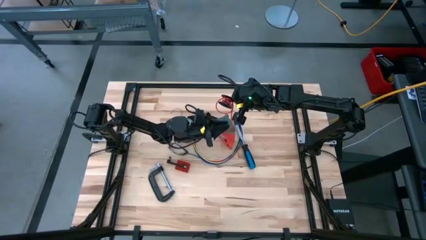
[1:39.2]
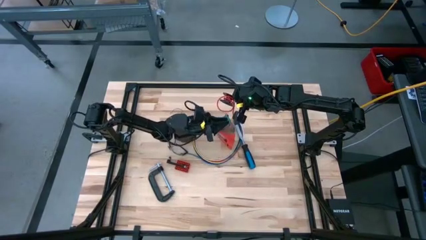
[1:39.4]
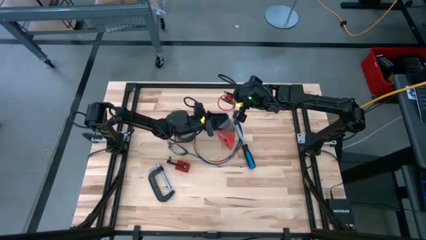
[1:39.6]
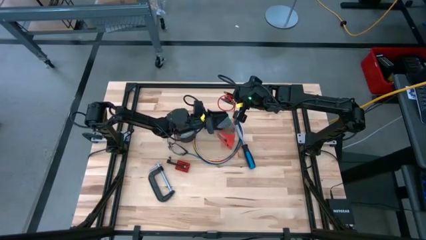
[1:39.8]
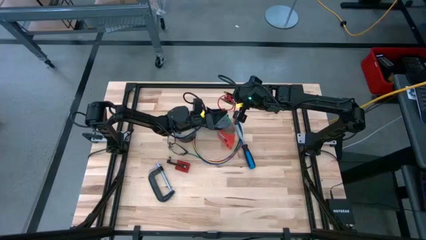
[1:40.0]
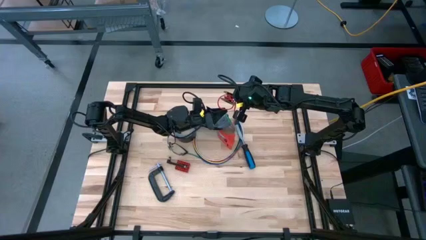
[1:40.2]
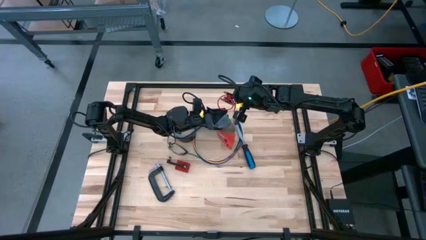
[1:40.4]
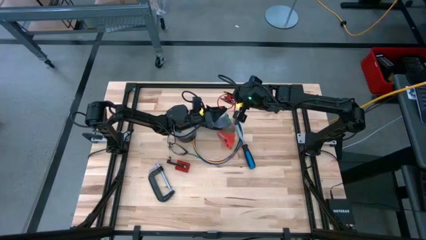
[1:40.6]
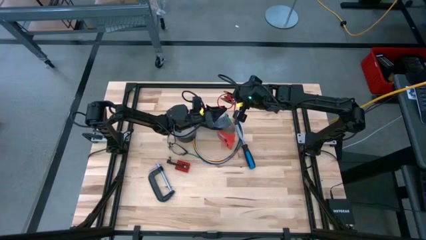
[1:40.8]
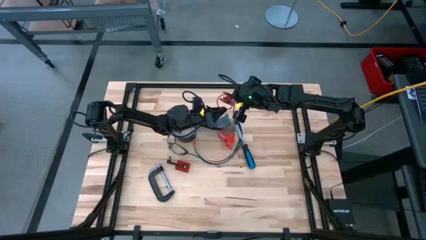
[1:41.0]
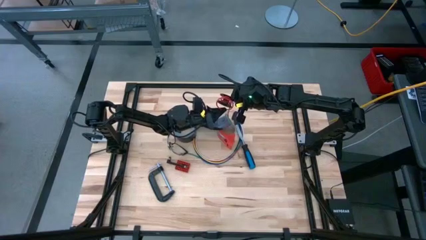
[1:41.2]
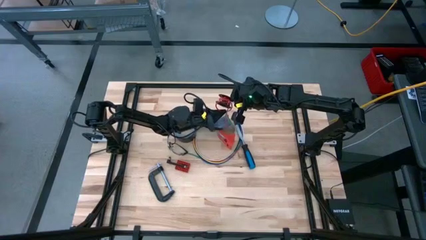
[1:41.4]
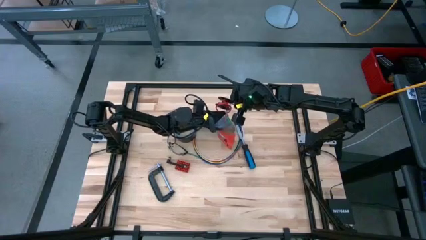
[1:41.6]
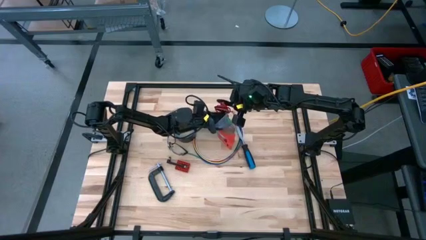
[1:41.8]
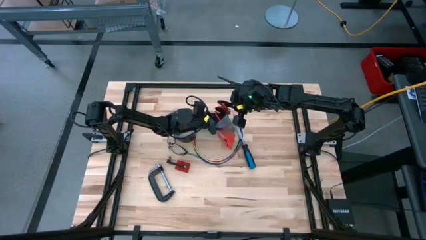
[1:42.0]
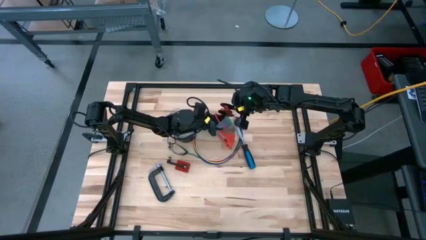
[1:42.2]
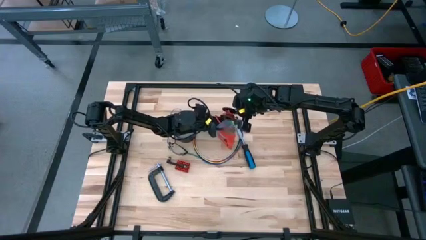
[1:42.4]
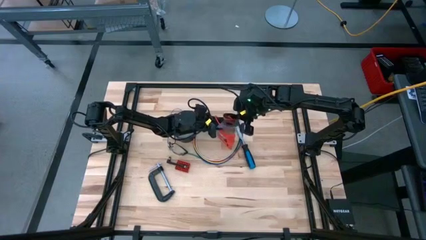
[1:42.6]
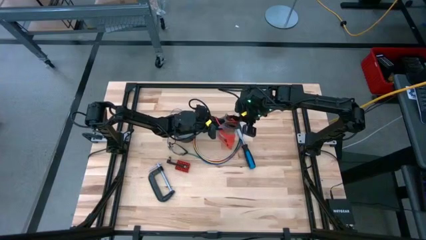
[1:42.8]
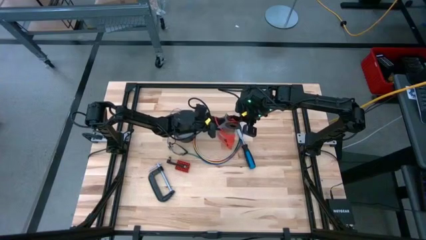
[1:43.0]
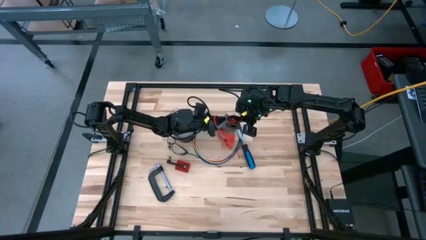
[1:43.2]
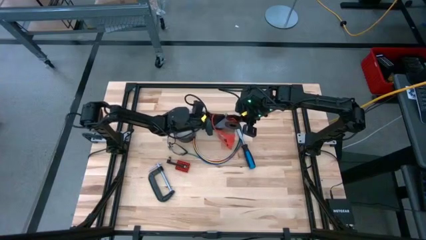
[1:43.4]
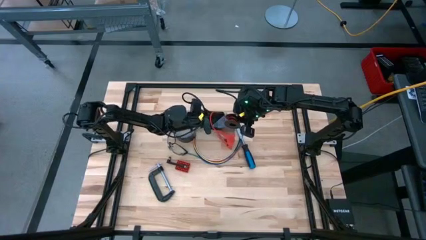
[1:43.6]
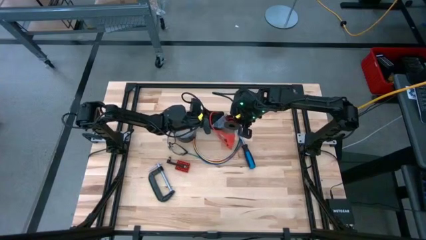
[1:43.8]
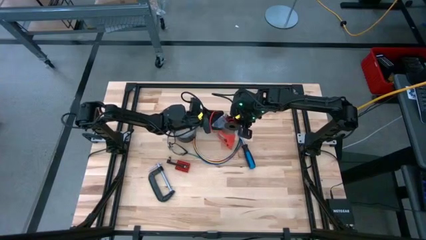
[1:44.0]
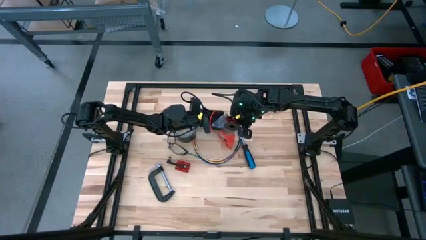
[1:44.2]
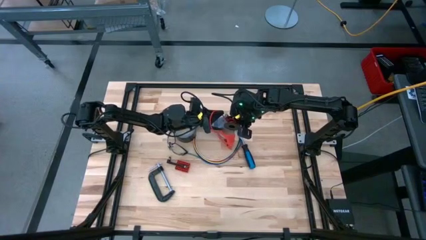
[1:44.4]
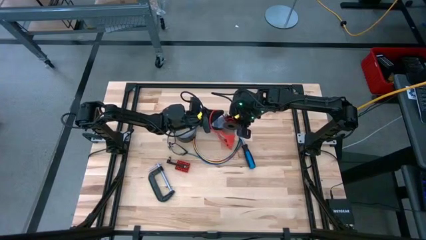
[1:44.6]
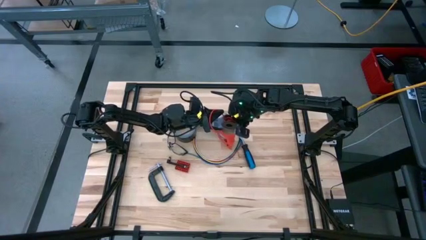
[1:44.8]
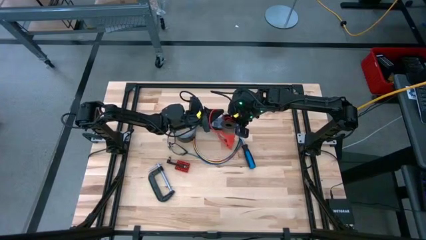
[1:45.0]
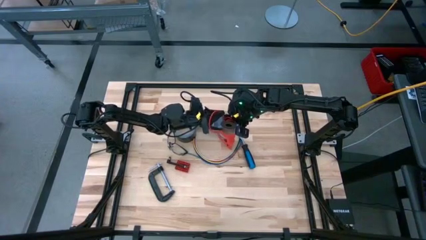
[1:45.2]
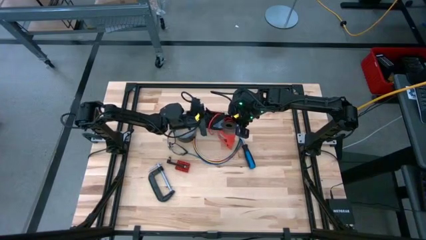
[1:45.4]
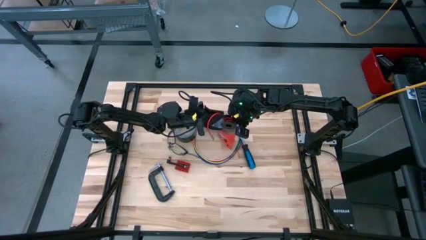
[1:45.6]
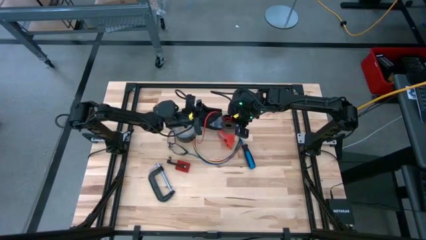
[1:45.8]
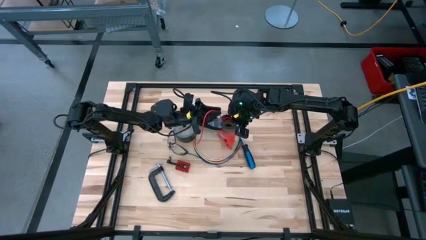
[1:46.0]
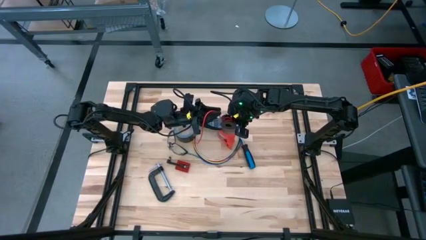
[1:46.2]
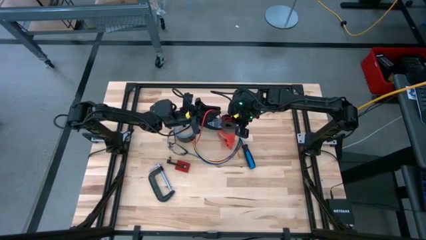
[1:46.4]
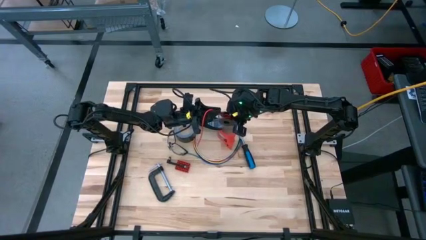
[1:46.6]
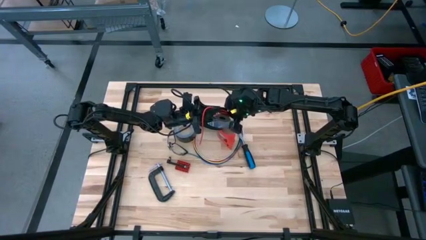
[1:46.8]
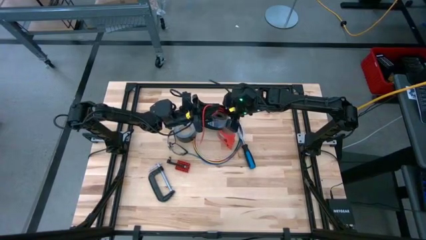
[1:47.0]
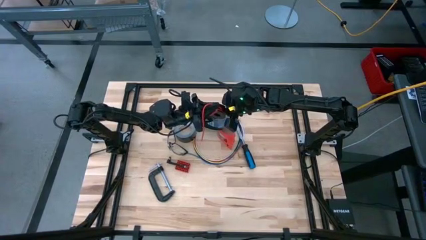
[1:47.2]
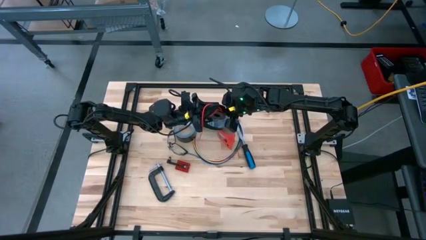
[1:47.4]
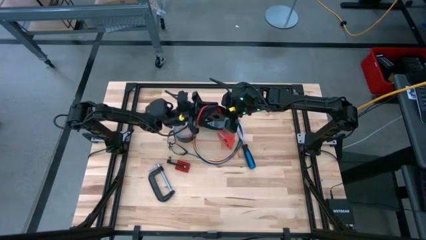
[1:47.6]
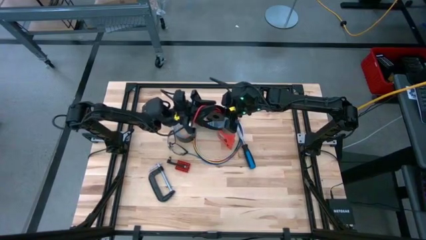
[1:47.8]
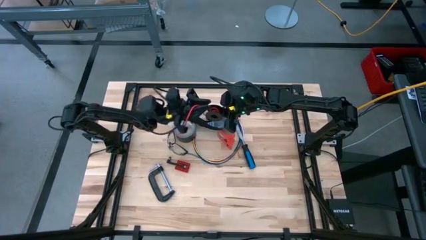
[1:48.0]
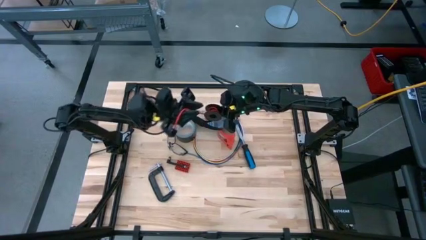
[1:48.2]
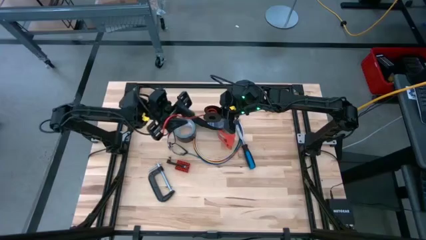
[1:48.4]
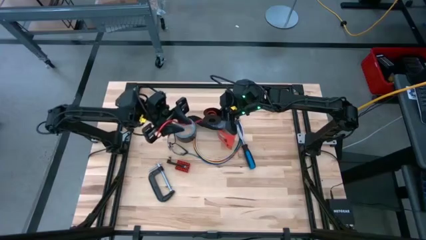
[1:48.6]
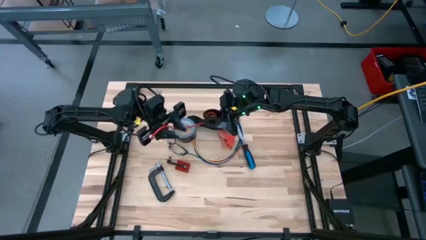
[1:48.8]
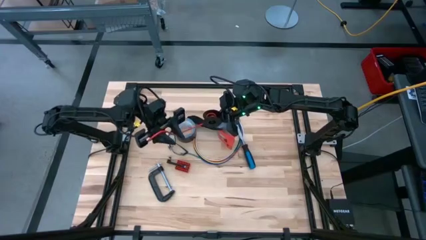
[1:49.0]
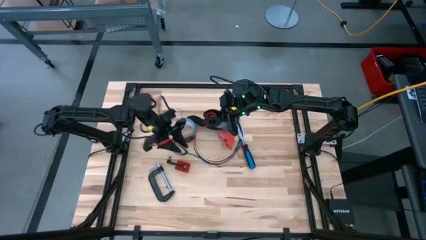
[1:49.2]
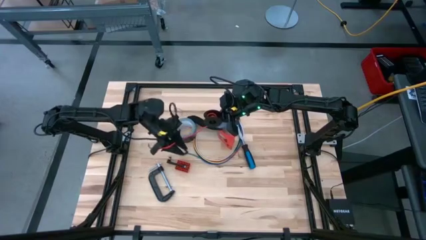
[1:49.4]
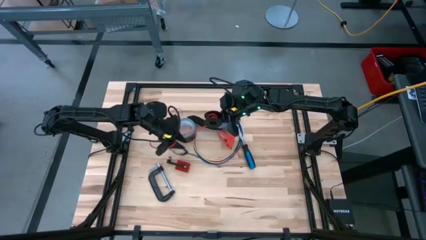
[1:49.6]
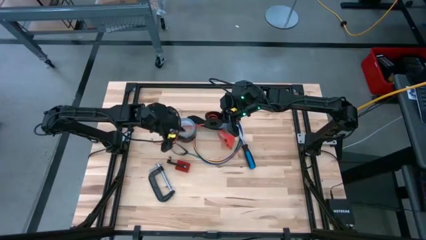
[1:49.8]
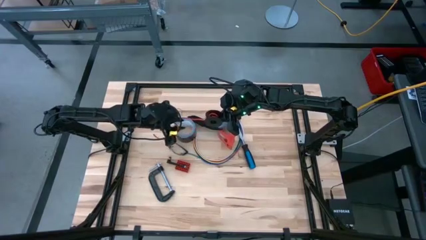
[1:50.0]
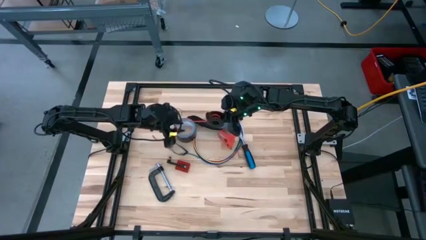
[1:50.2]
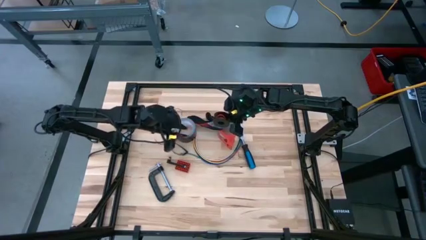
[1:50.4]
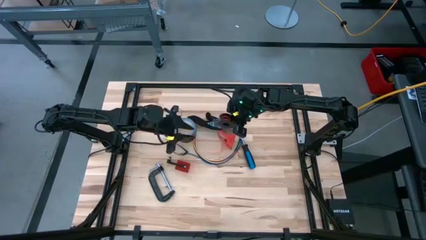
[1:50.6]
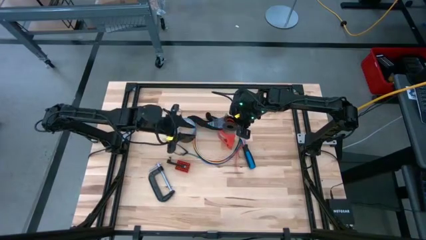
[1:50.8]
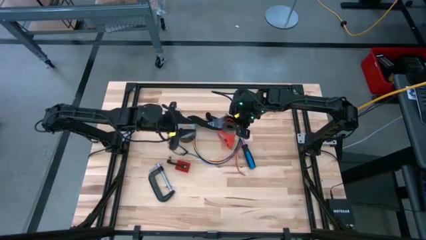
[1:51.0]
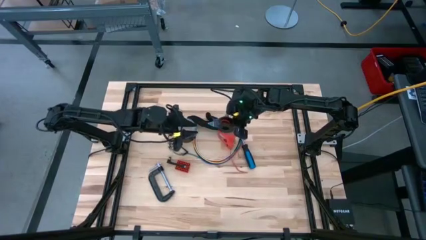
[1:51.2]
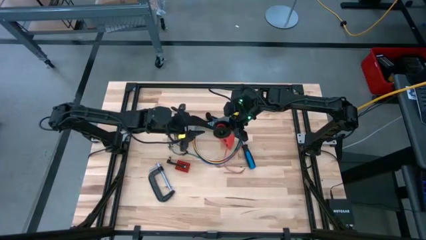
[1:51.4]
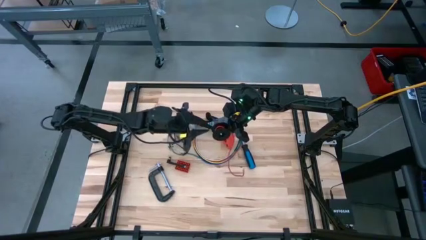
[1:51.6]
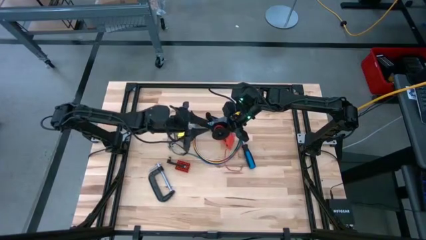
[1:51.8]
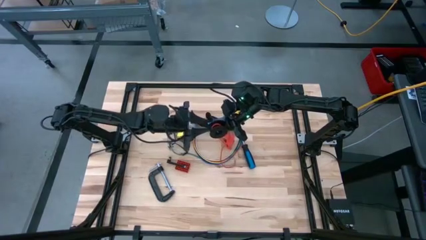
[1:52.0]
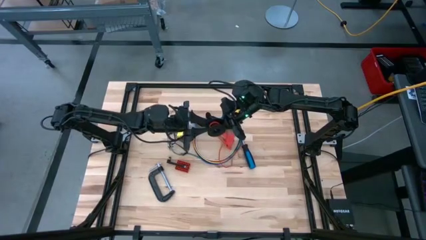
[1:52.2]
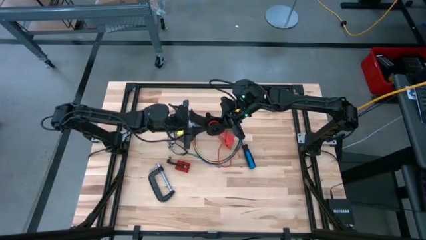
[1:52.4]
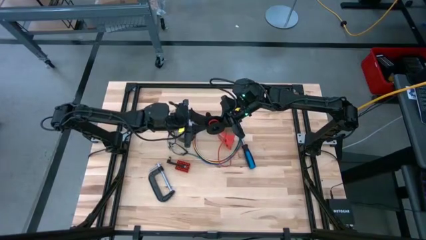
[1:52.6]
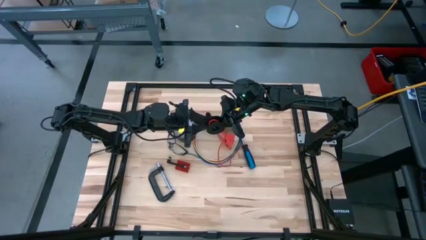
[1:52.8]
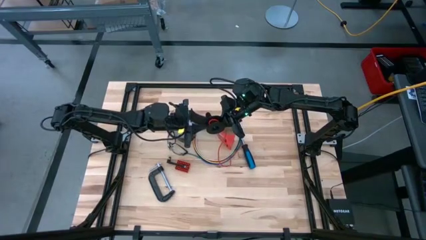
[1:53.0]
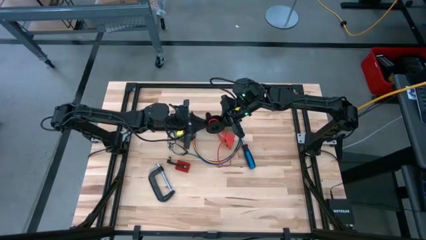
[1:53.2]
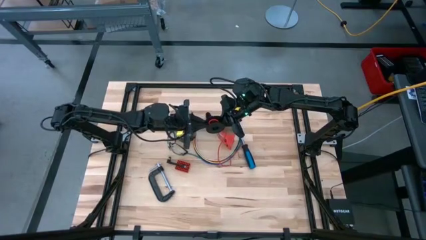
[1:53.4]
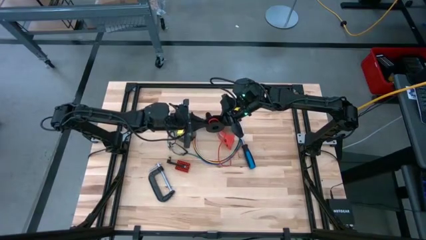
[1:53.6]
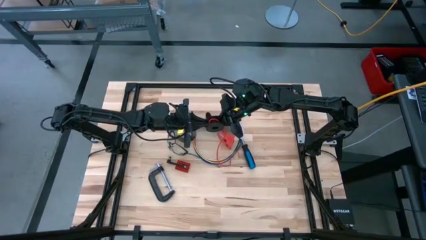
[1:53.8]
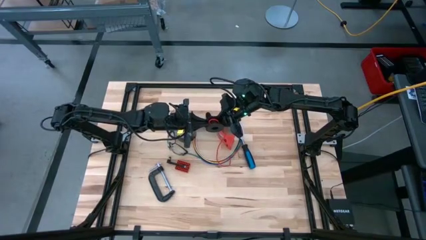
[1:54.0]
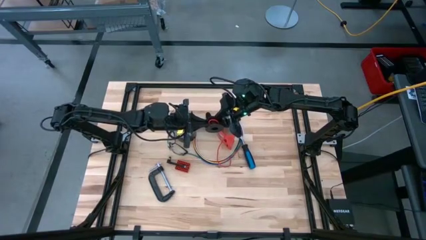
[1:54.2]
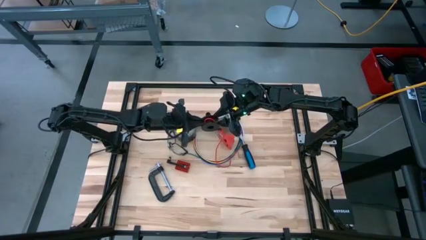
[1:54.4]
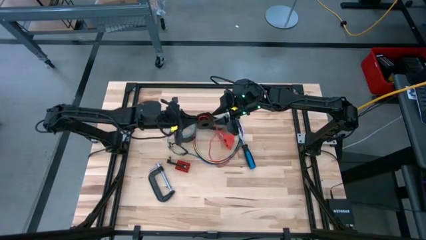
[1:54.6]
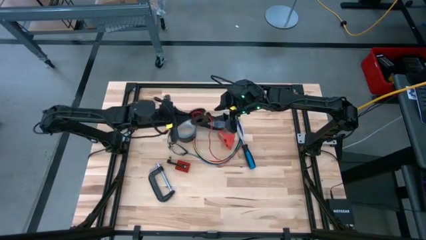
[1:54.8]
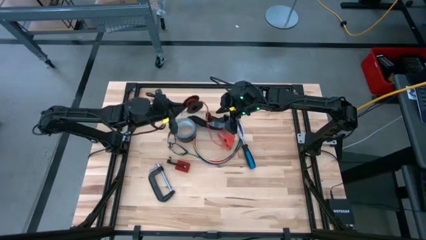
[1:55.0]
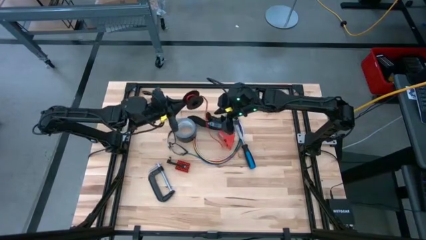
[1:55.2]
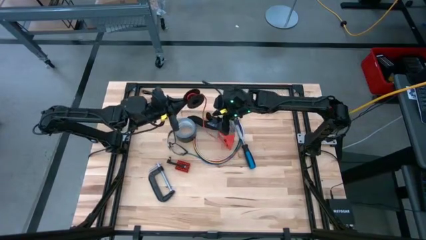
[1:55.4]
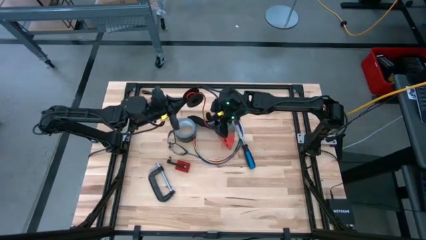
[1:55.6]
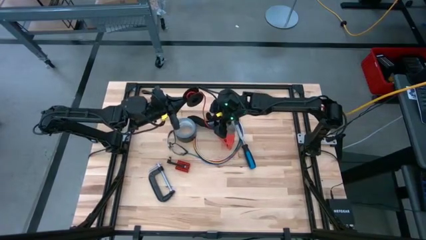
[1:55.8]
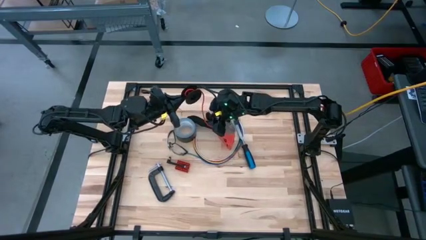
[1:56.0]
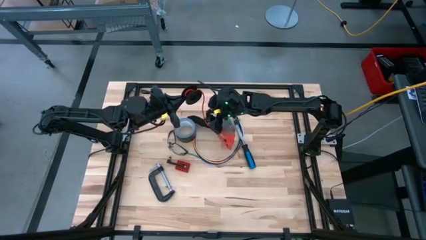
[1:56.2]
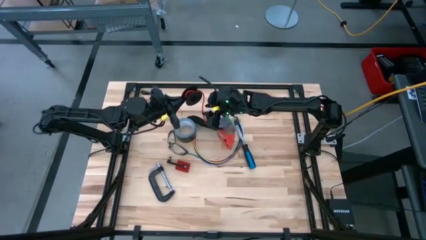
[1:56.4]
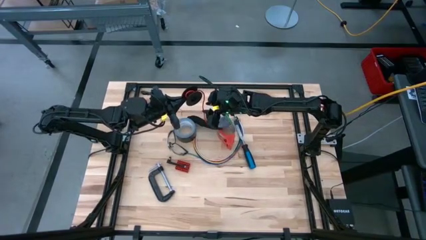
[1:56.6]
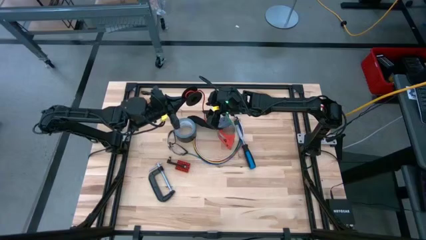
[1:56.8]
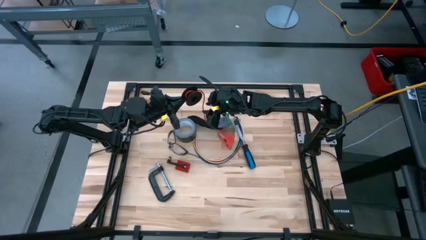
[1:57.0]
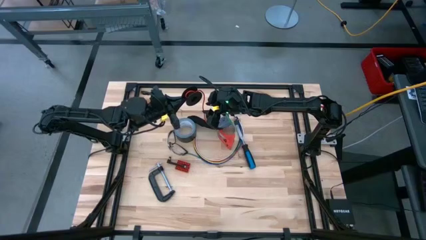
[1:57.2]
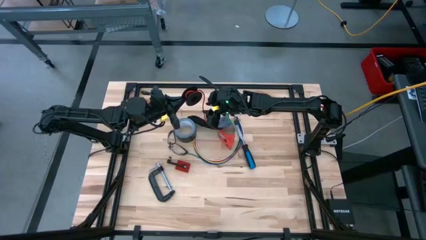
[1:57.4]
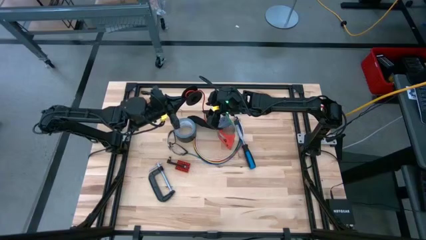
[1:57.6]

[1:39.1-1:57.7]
Task: Coil cords
Coil the red wire cable onto the black spool
